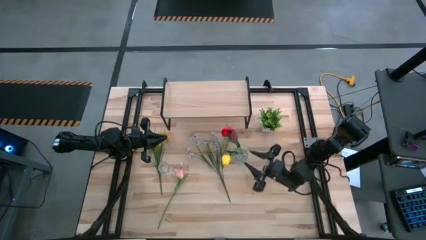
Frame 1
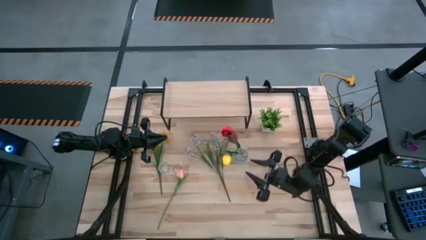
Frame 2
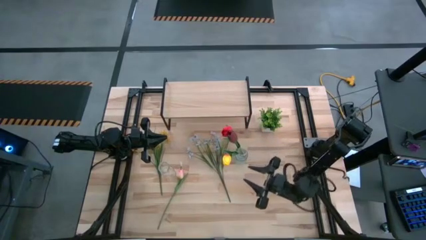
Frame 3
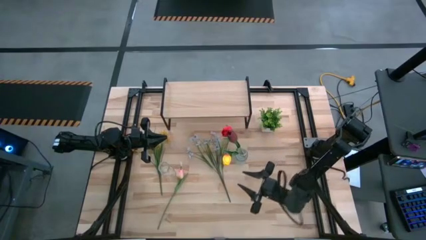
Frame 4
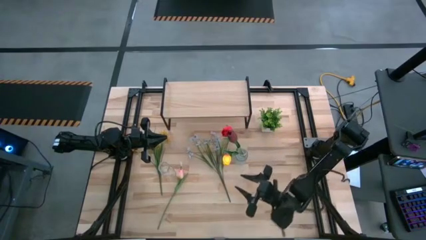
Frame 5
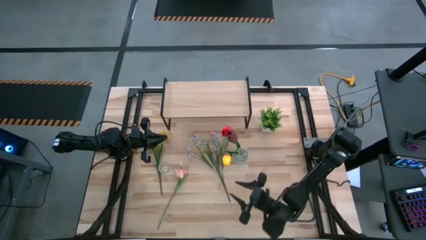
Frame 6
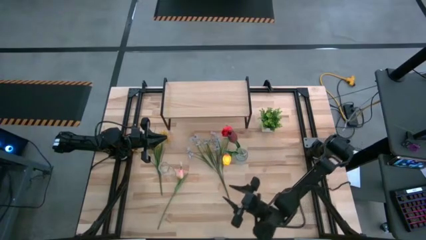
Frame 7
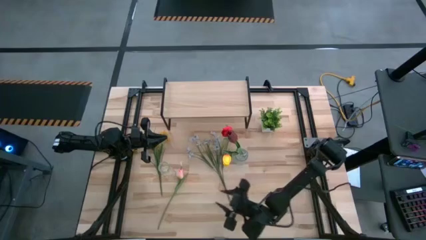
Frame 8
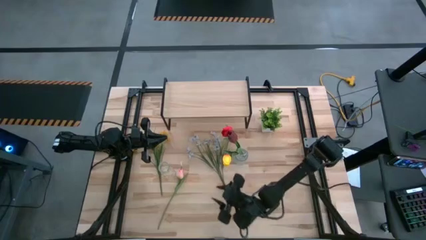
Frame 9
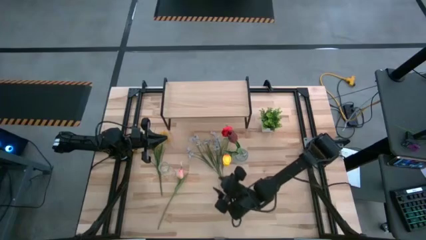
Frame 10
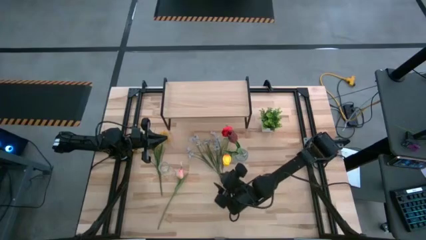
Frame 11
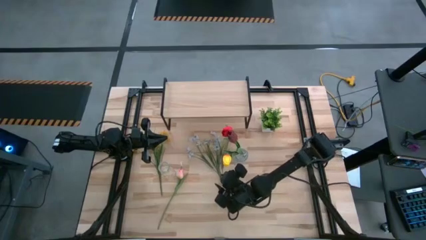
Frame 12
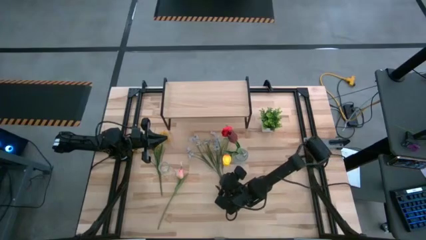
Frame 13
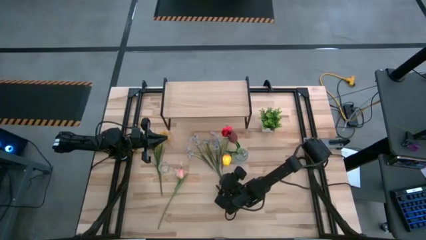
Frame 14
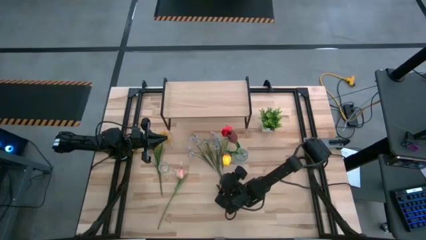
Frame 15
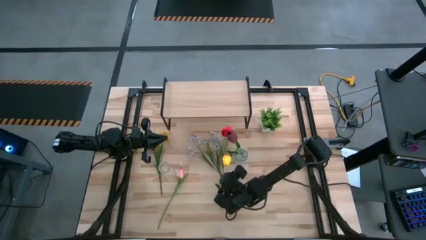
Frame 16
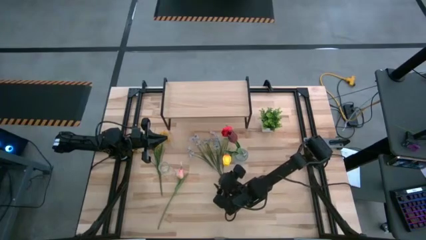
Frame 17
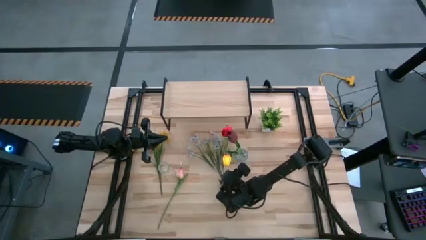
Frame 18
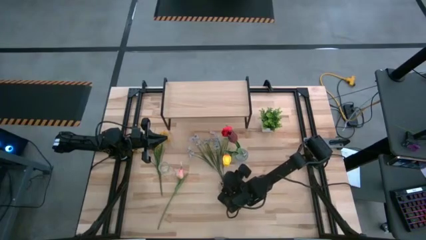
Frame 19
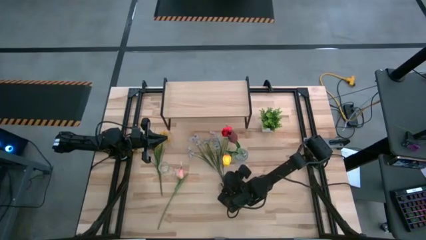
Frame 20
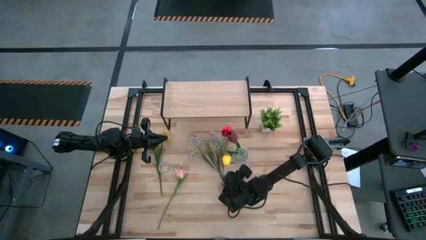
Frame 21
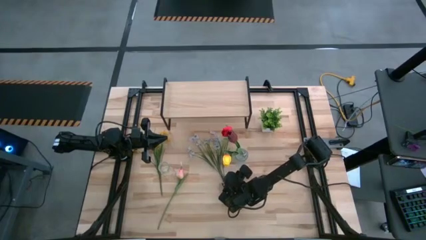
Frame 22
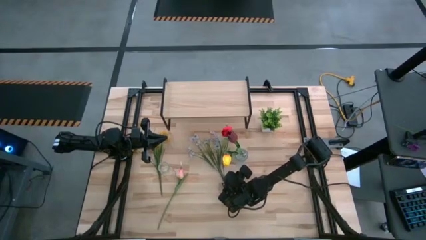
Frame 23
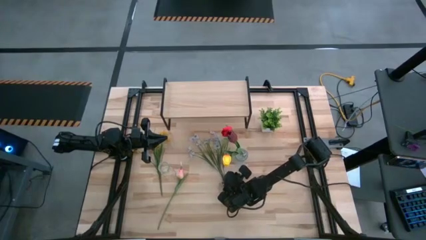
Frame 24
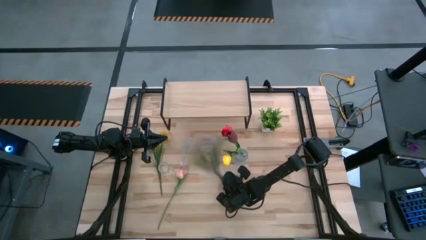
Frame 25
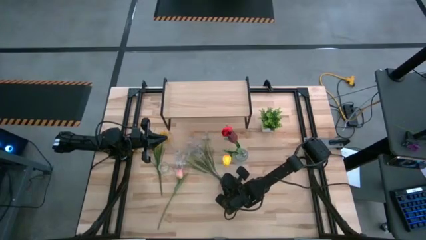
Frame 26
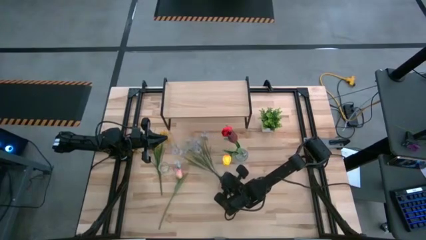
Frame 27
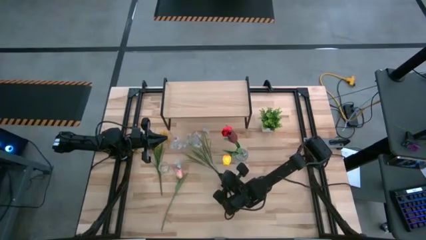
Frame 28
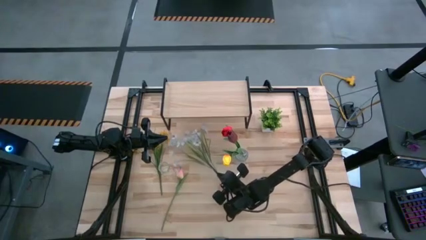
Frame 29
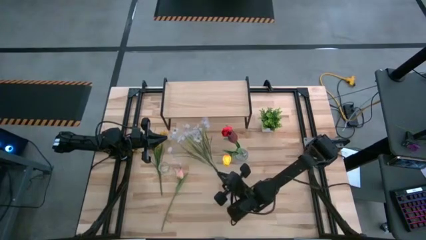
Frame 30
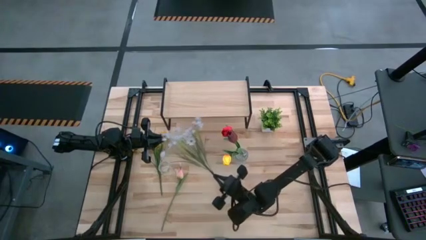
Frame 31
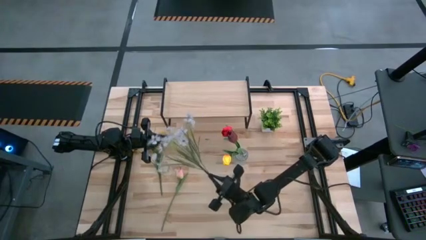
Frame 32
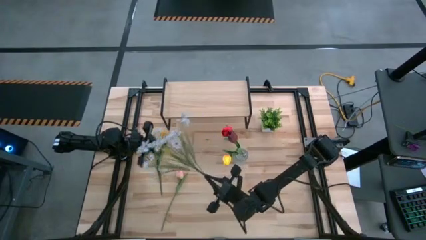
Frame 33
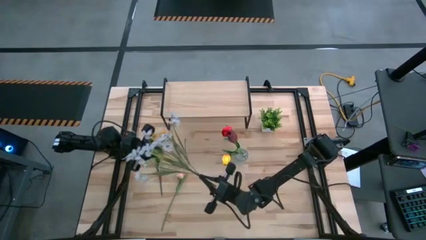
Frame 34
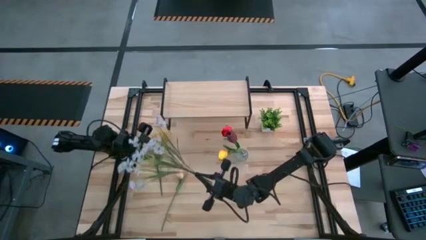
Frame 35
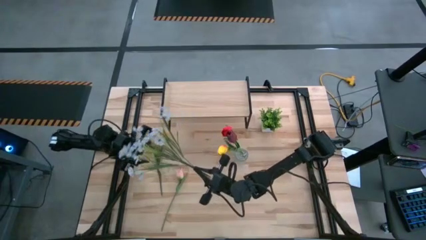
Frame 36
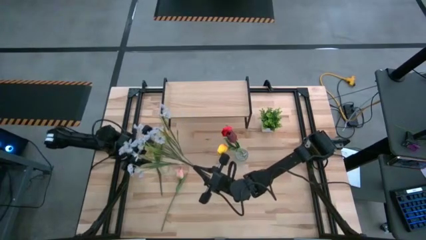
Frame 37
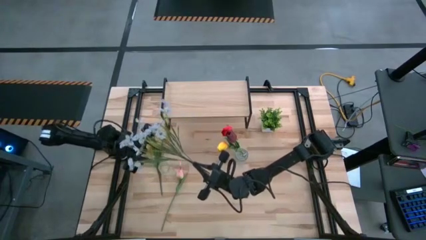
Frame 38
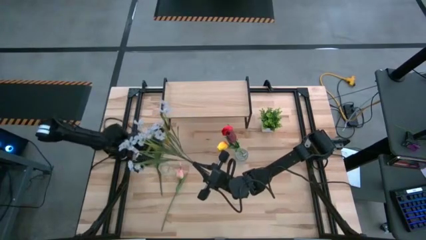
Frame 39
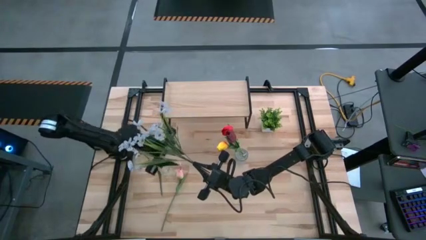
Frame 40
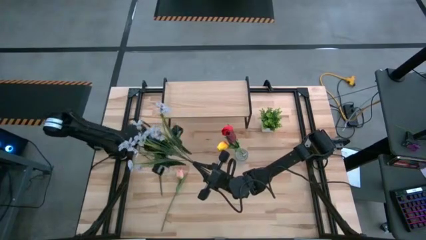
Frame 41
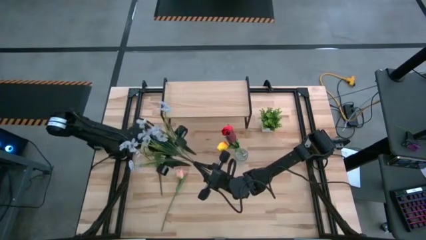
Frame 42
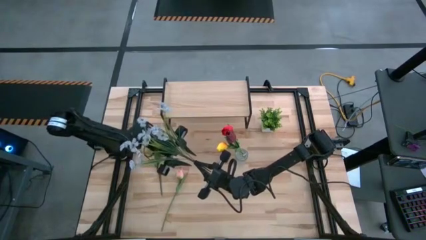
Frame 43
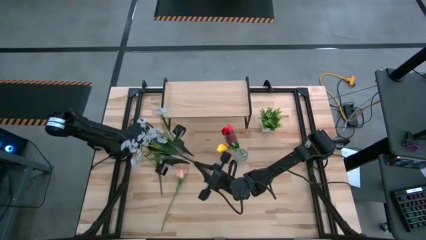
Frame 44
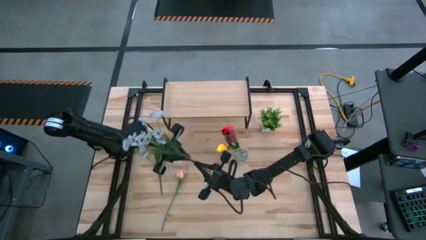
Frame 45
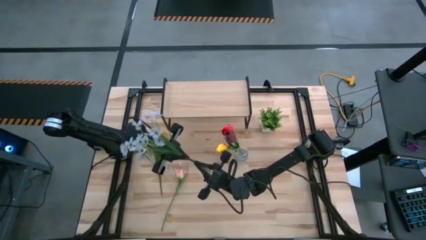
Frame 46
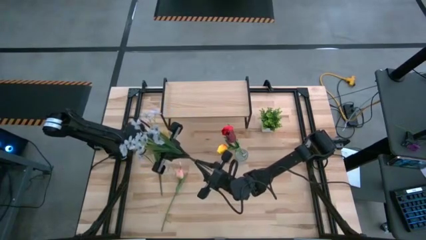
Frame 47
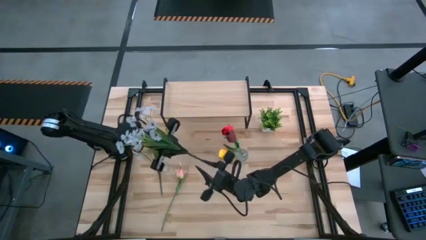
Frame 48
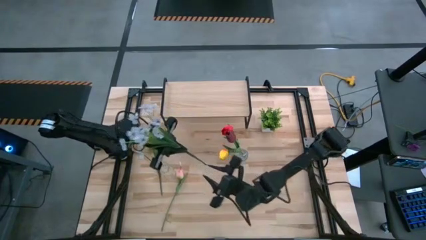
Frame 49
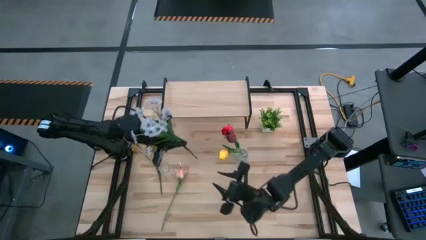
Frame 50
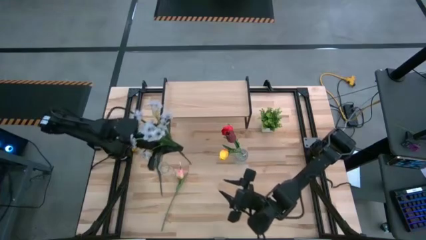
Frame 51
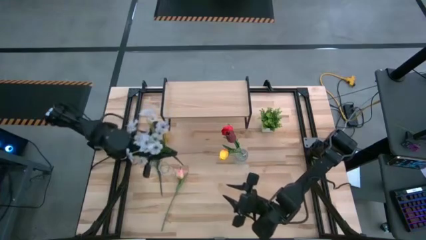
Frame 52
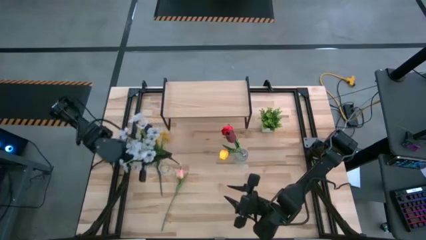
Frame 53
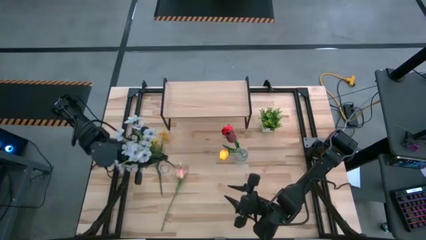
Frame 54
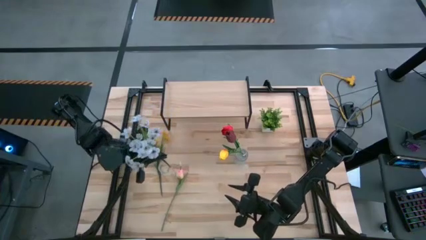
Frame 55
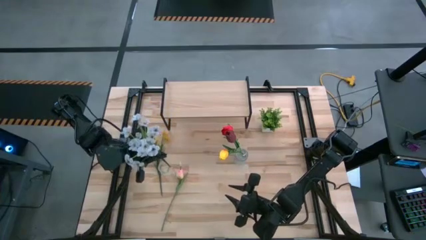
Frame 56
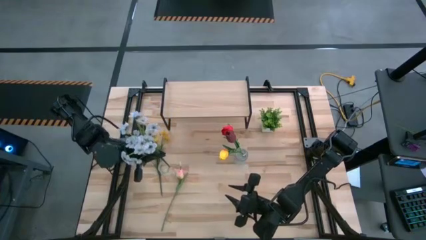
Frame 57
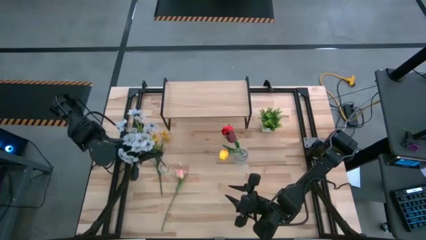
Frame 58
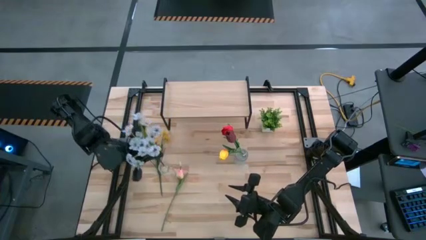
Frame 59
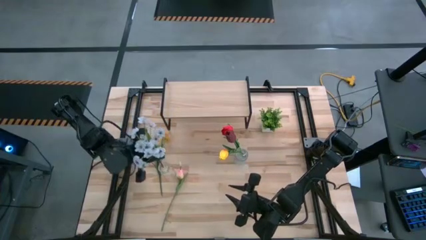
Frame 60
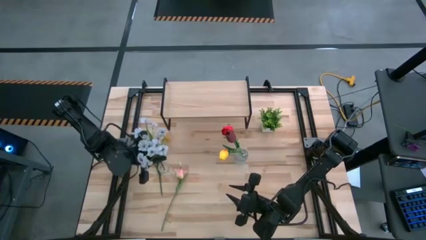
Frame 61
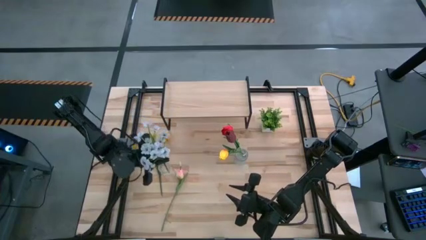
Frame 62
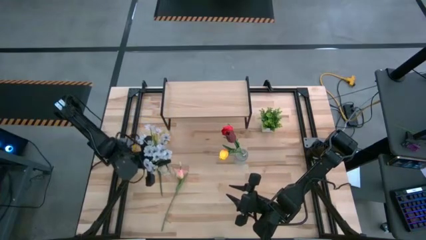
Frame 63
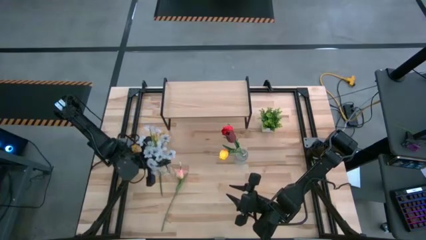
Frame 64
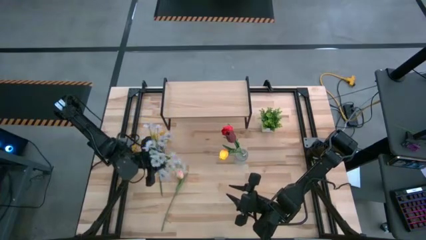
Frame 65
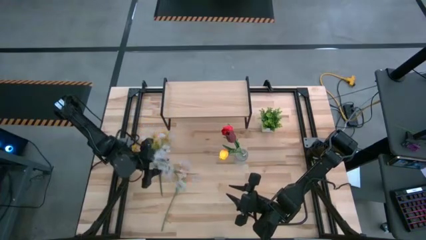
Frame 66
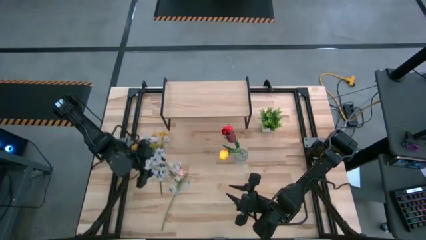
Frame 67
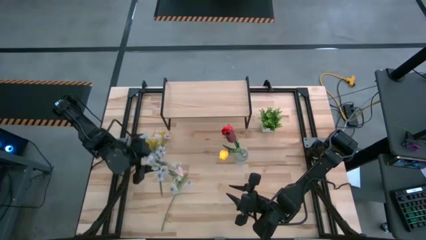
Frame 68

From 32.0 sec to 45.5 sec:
Task: Pick and place flowers into a vace then onto a shelf
Put the white flowers into the bottom transparent vase

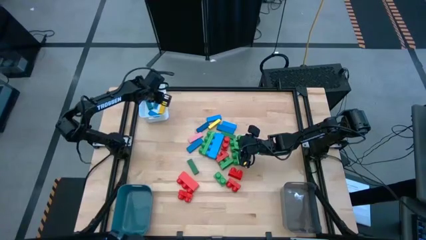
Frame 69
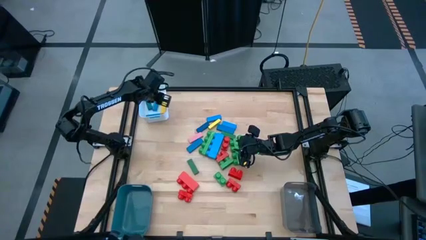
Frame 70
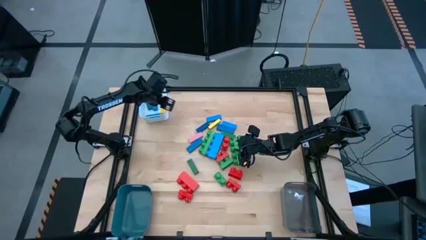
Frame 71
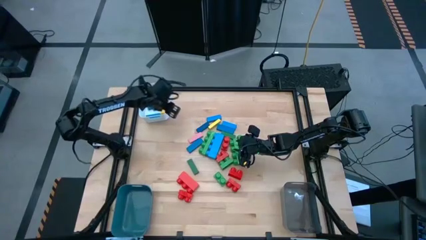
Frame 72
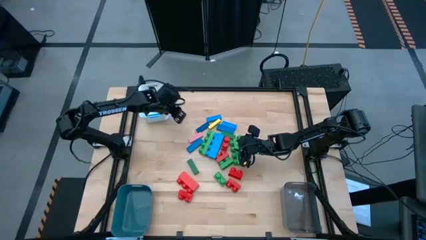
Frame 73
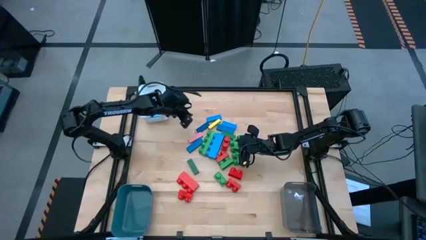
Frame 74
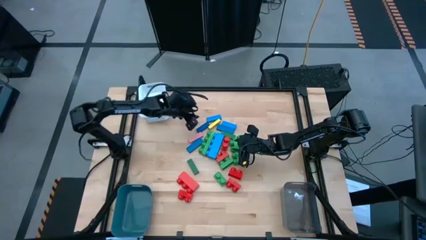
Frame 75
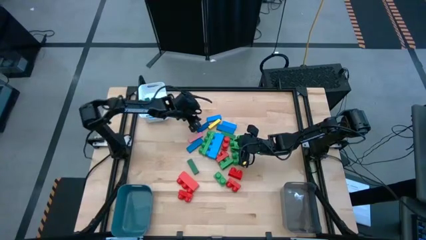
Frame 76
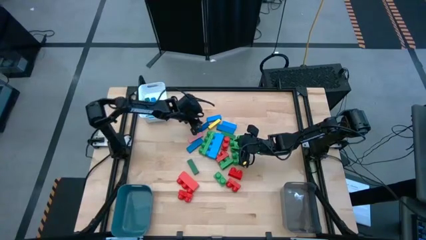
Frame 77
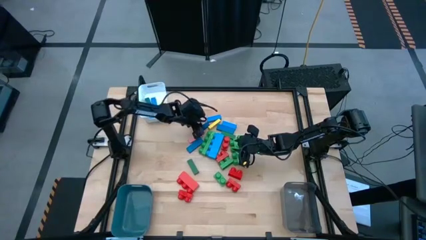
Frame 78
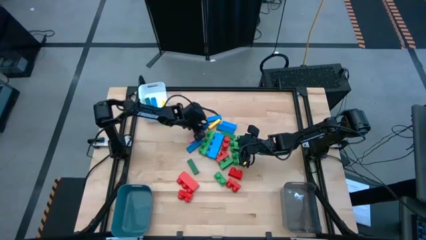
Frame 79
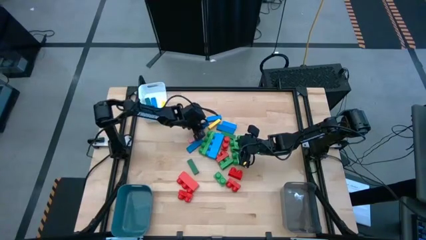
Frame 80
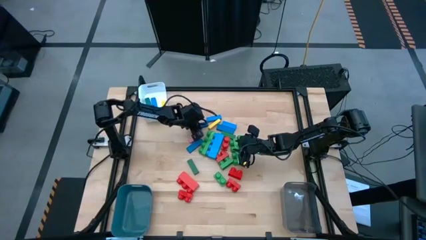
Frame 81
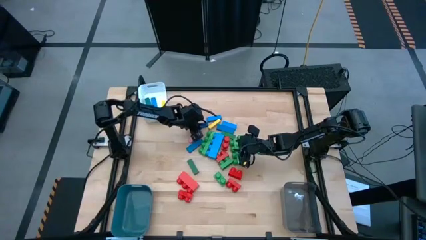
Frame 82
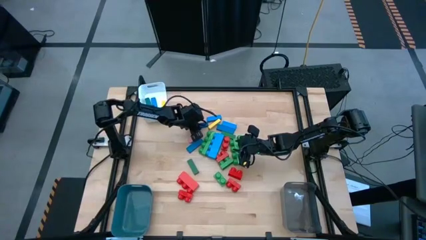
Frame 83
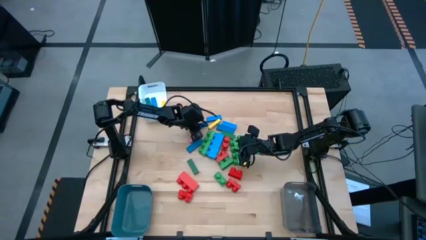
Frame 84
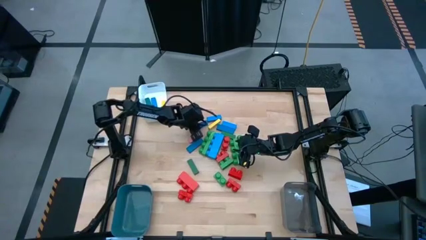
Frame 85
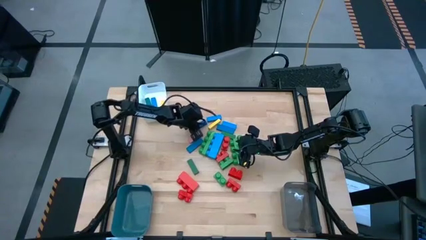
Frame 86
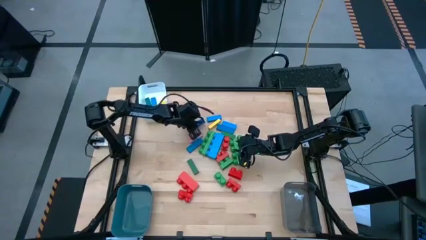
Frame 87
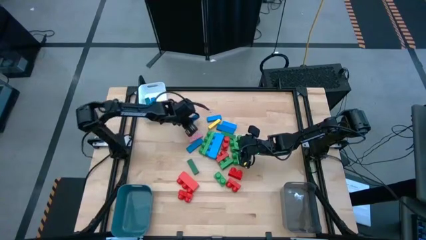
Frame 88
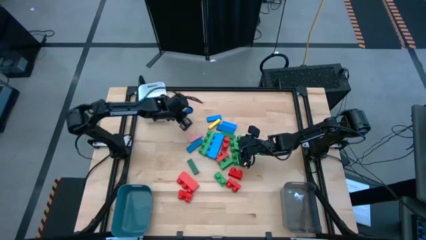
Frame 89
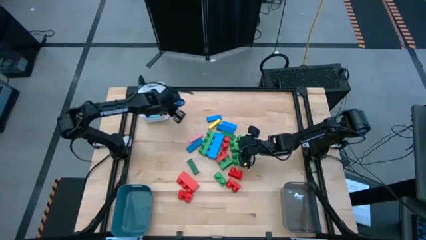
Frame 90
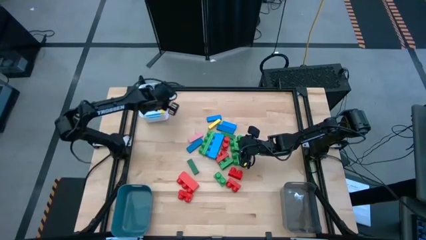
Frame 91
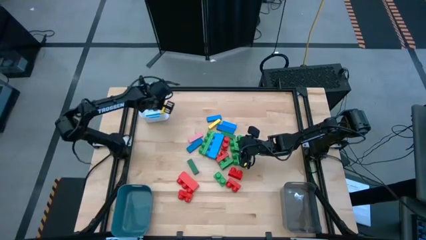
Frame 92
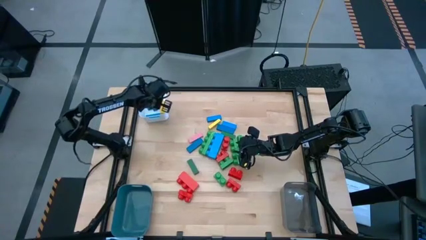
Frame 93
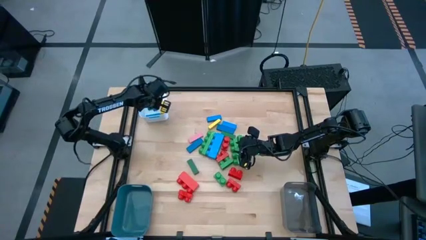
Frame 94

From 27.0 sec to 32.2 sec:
Task: Sort blocks by size
Put the dark blue block into the white bin
